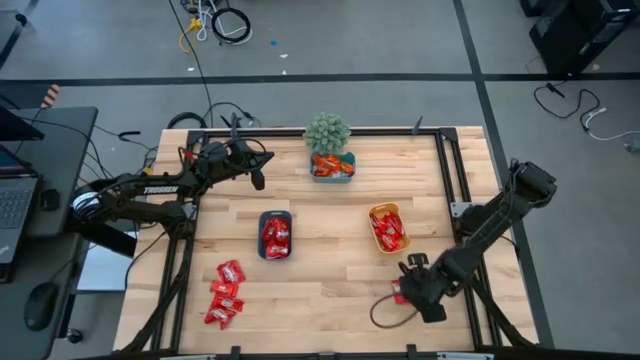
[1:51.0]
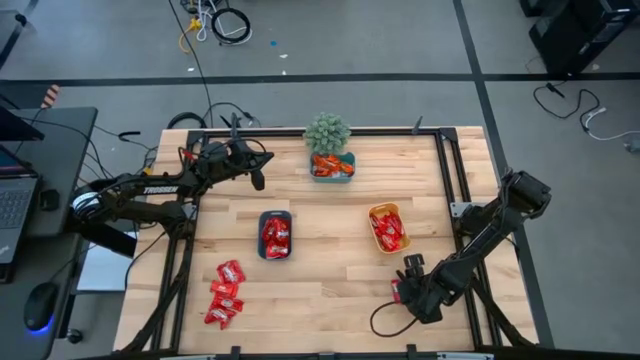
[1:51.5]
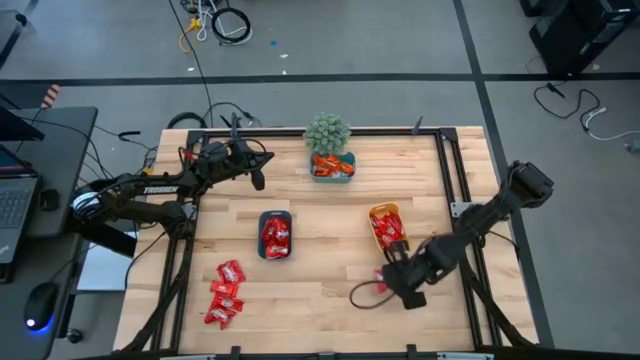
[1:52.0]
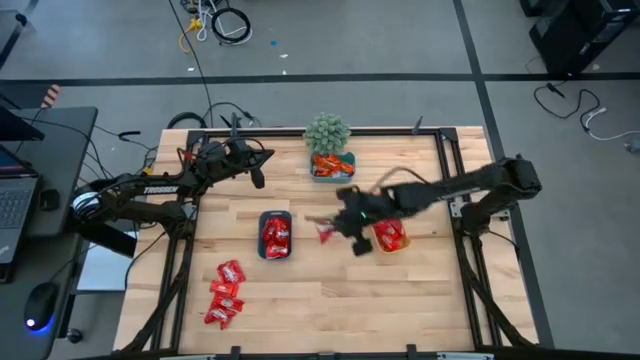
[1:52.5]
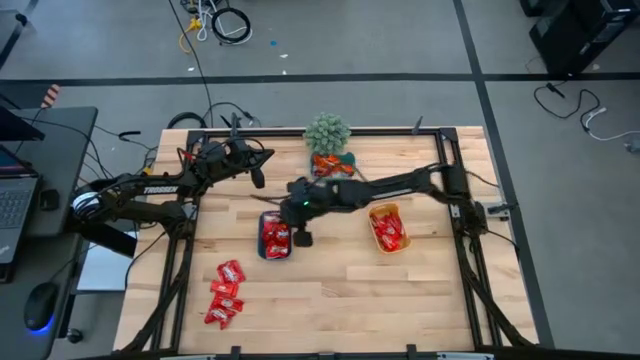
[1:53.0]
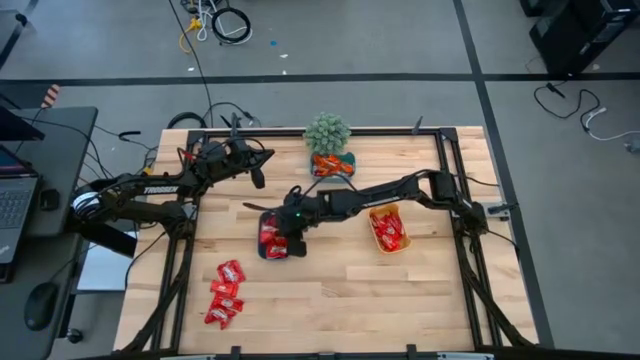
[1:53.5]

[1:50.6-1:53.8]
Task: Sort candy
Put the red candy into the blue bin

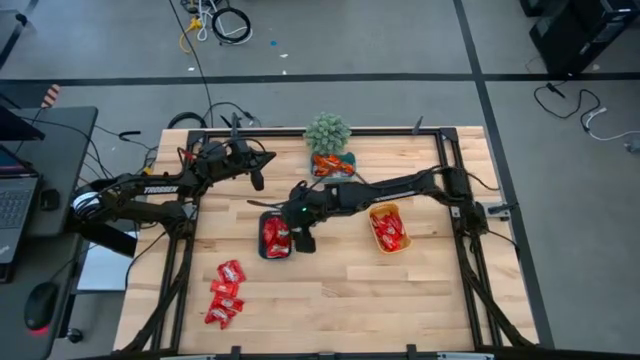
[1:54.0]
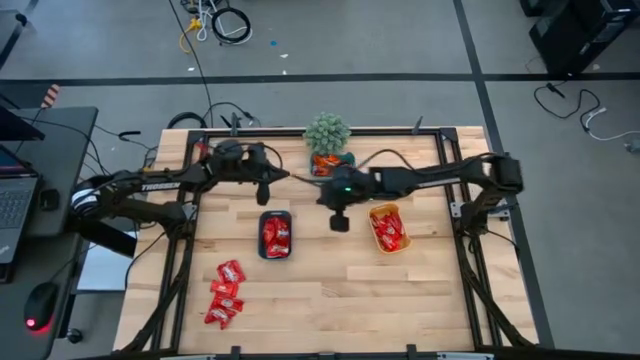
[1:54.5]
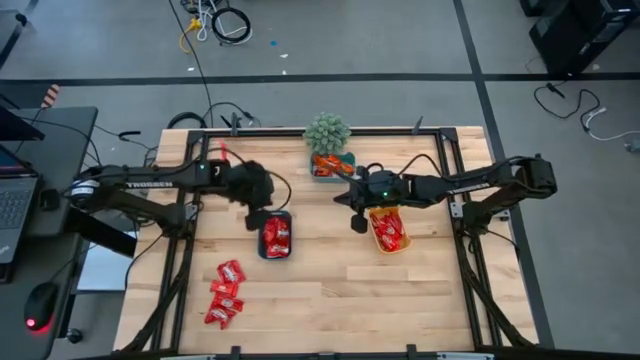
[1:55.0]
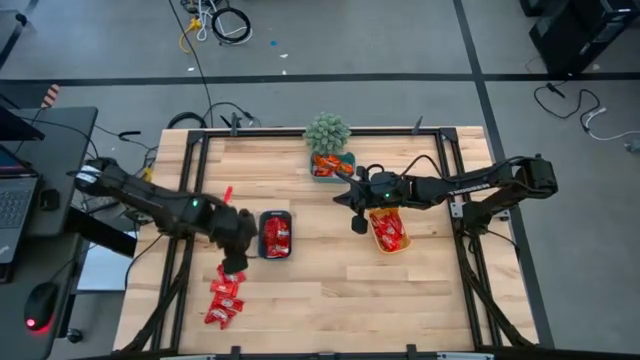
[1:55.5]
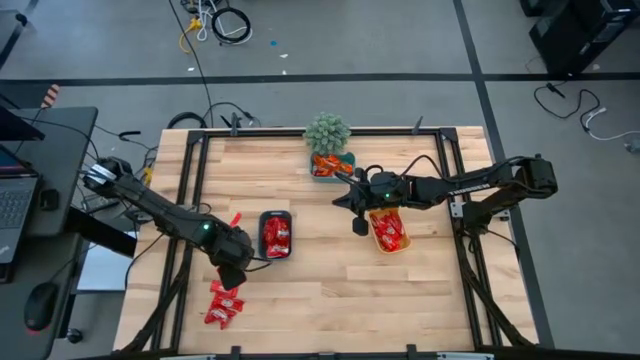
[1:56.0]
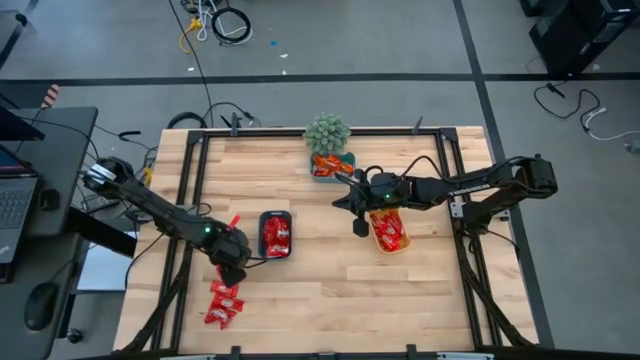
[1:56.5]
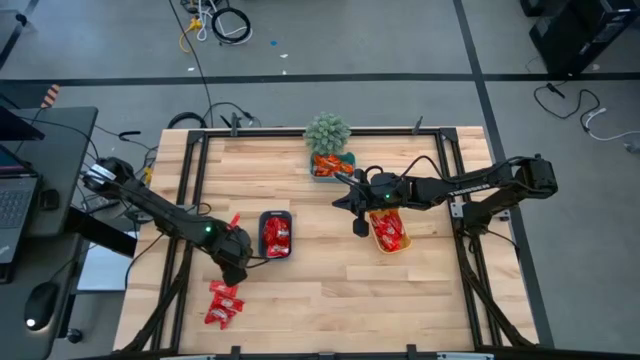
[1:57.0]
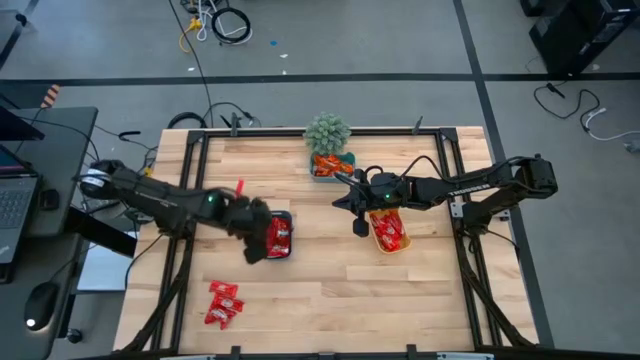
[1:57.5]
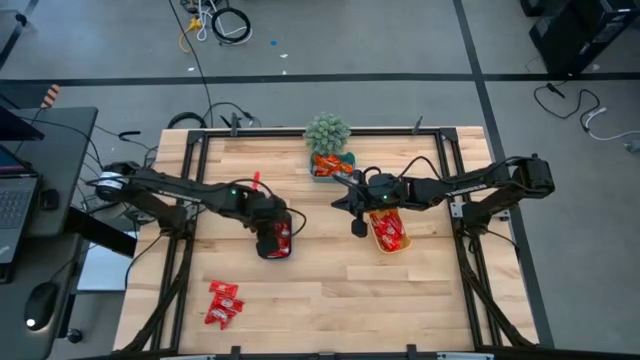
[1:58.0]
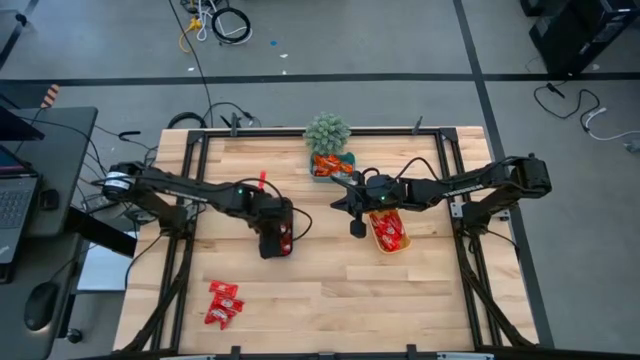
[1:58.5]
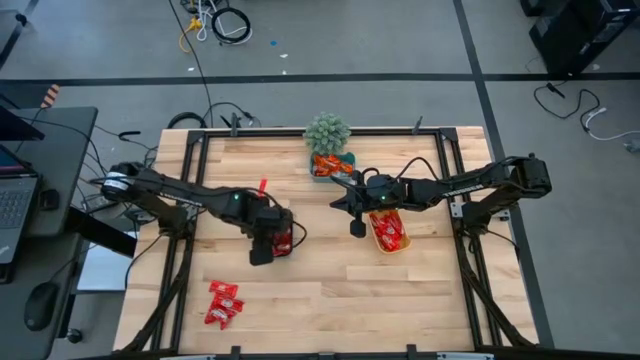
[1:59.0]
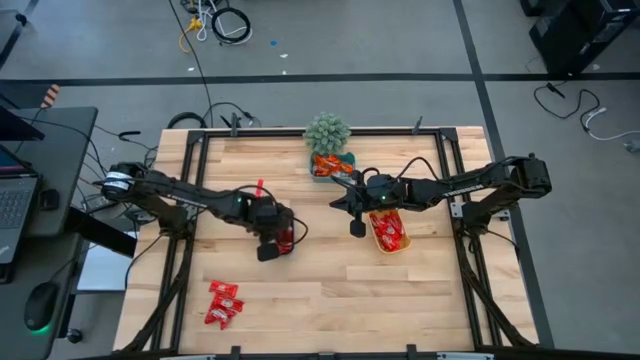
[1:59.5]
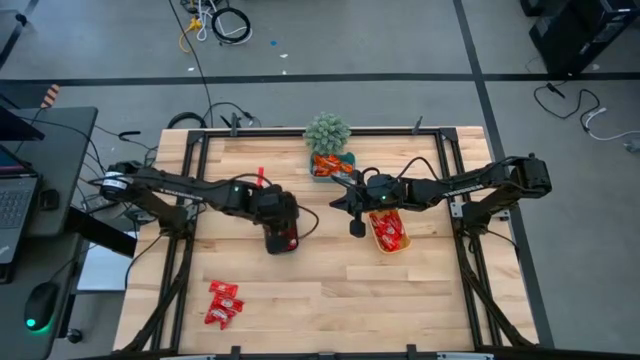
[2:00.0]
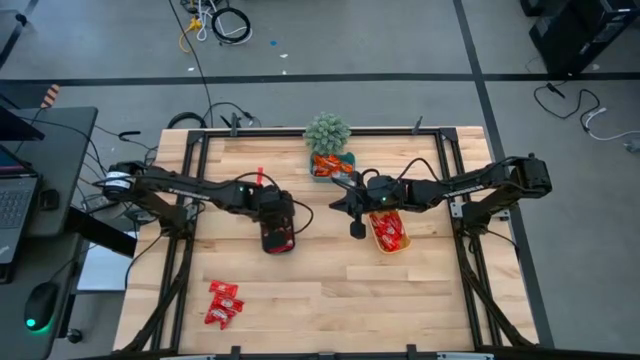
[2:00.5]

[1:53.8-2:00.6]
Put the red candy into the blue bin

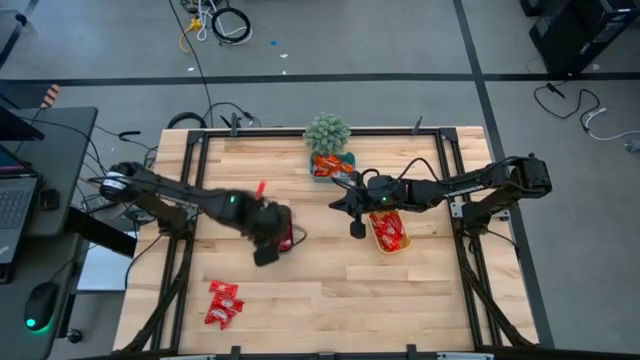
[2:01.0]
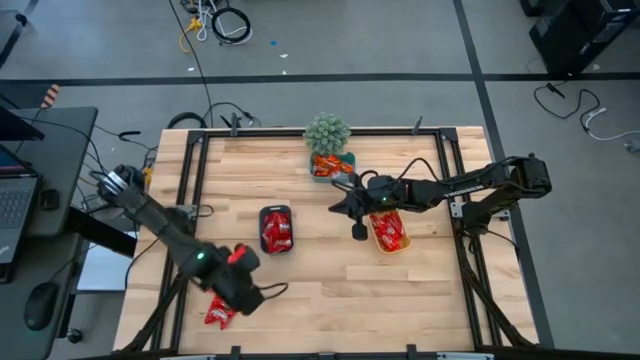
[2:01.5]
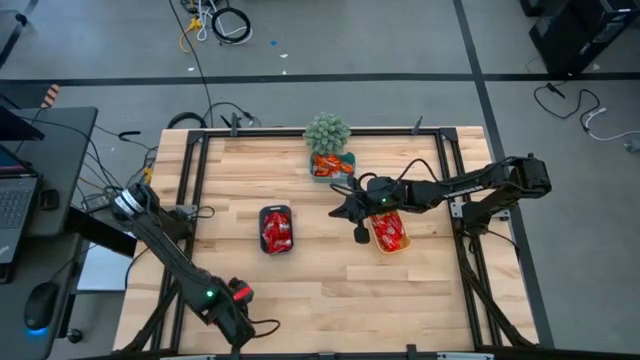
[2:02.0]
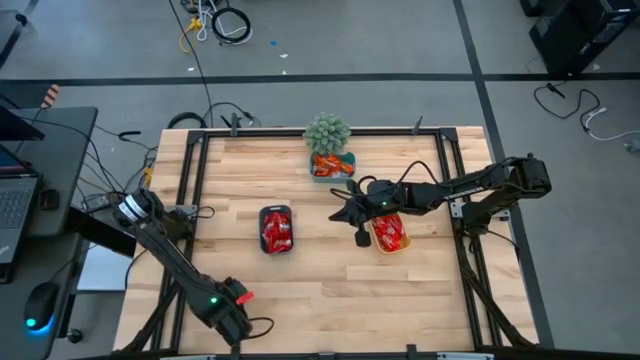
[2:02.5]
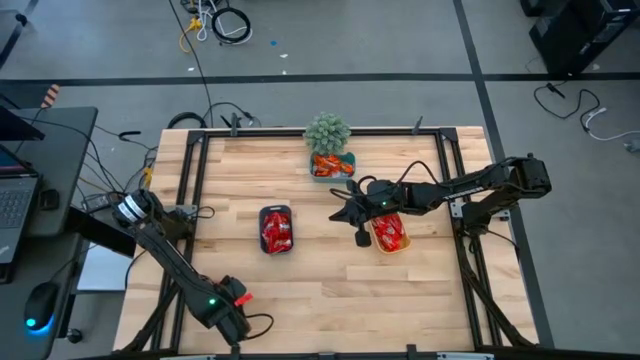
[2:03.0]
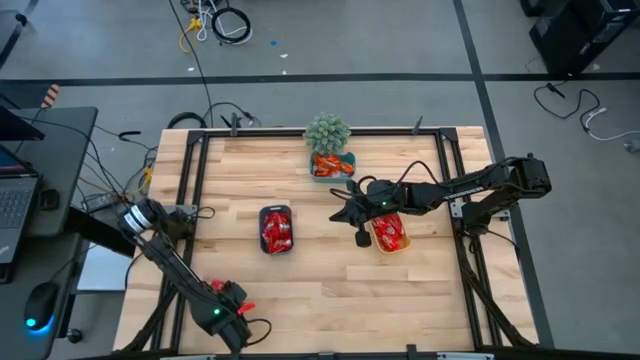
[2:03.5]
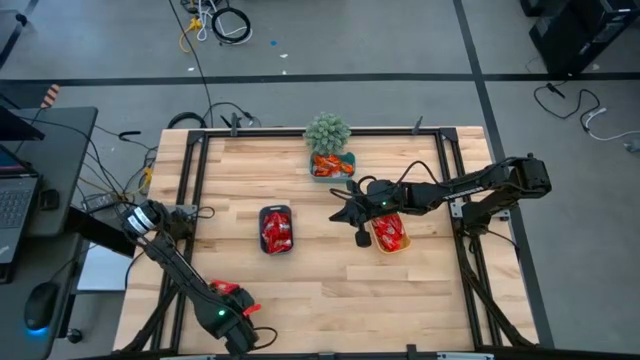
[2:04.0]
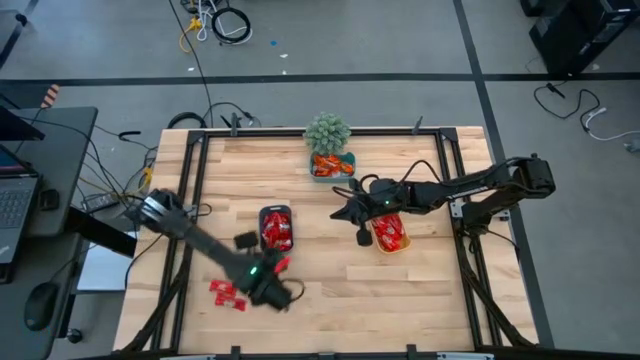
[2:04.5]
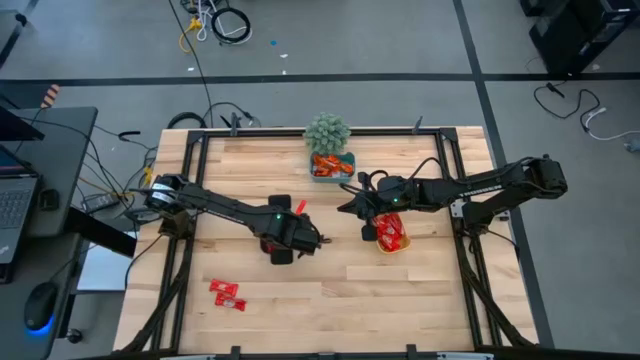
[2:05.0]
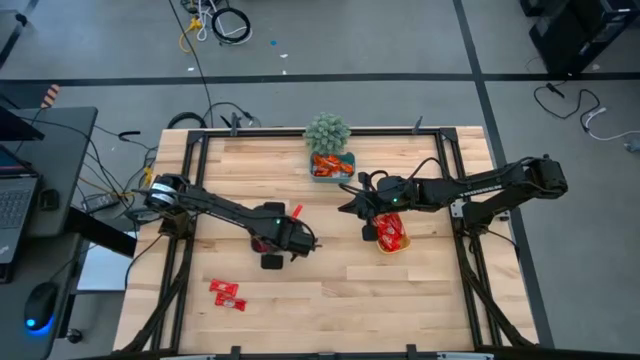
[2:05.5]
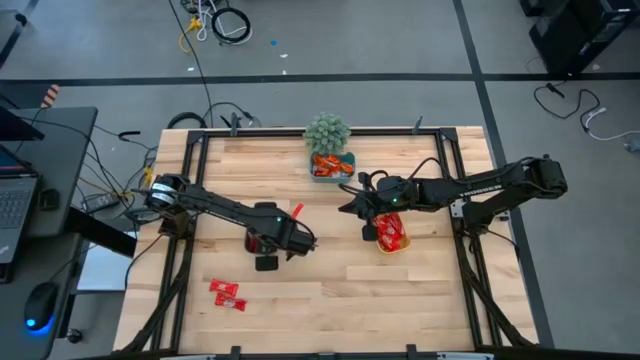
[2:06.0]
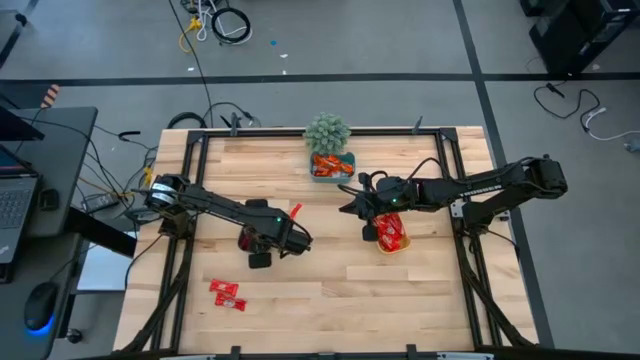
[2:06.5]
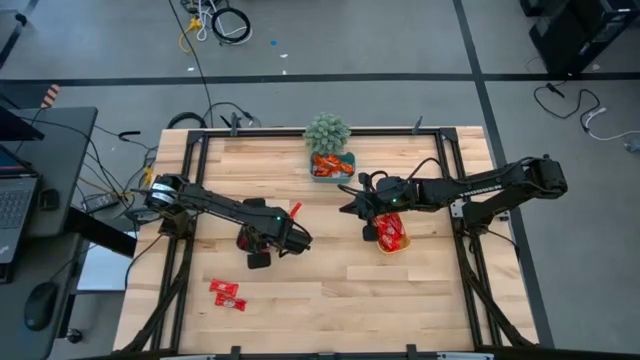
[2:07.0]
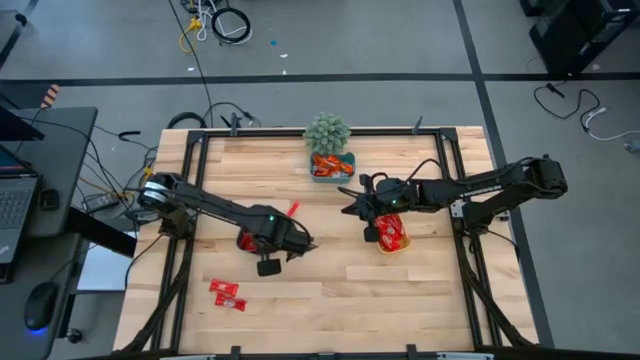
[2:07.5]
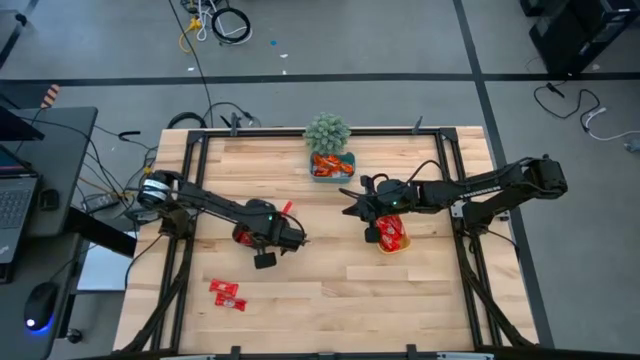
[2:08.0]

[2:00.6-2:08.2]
Put the red candy into the blue bin

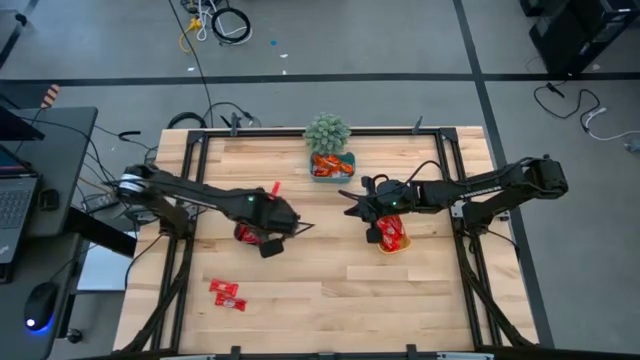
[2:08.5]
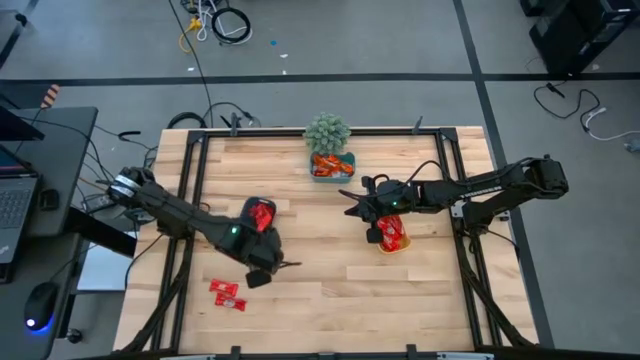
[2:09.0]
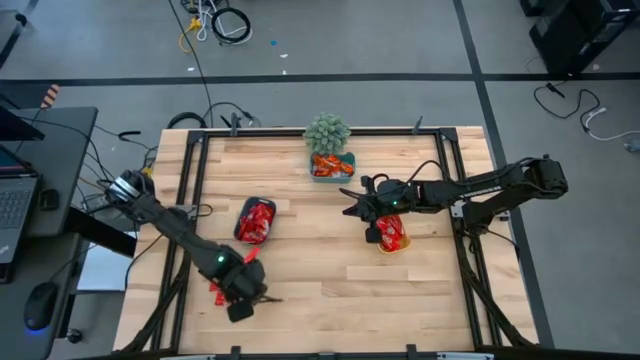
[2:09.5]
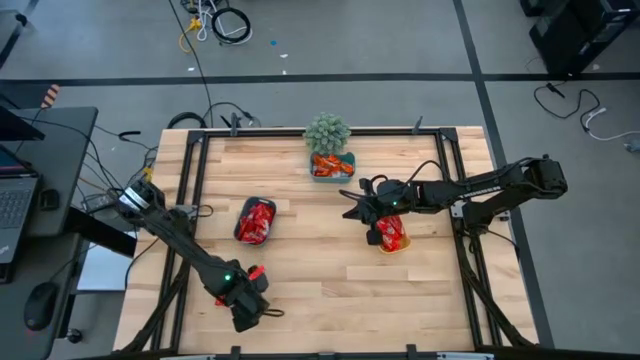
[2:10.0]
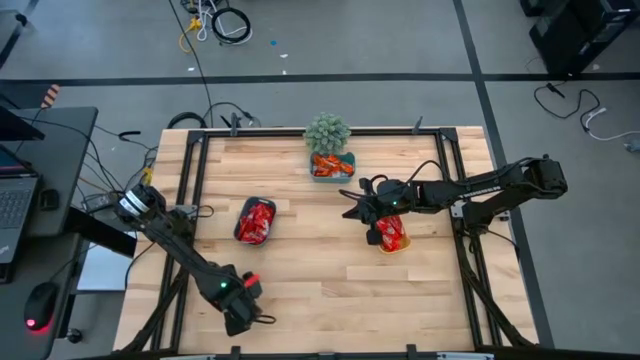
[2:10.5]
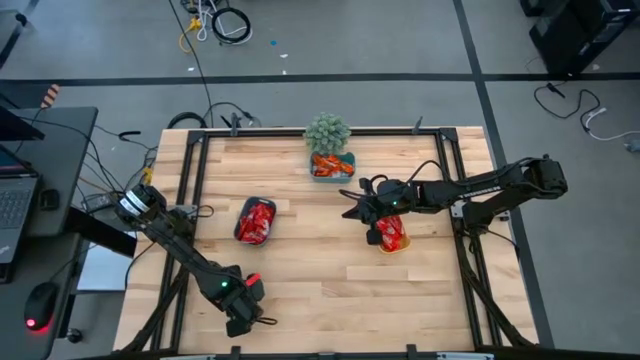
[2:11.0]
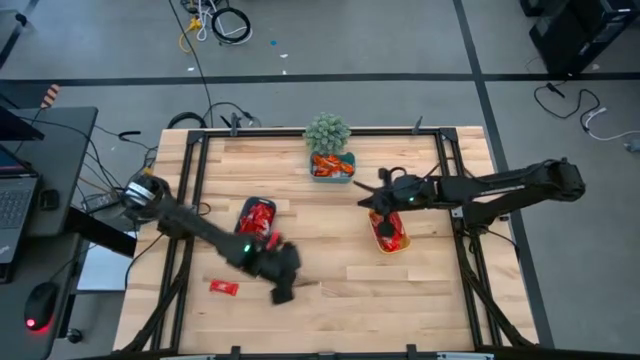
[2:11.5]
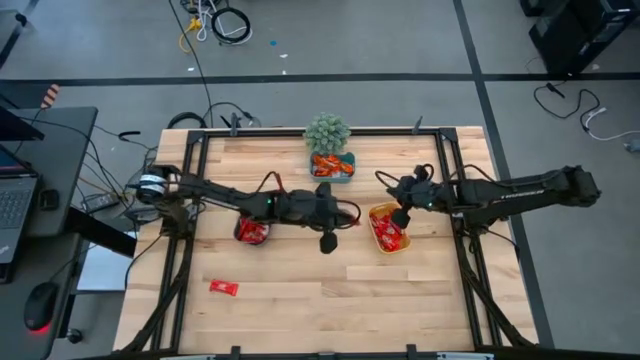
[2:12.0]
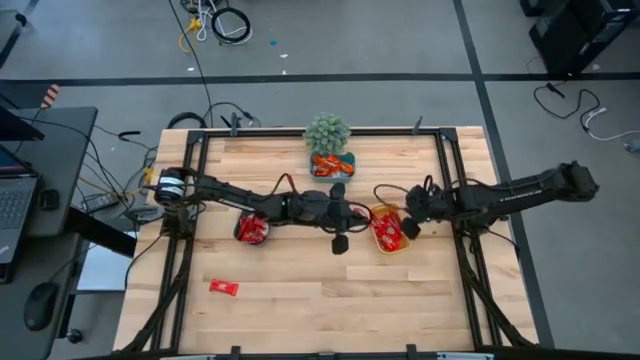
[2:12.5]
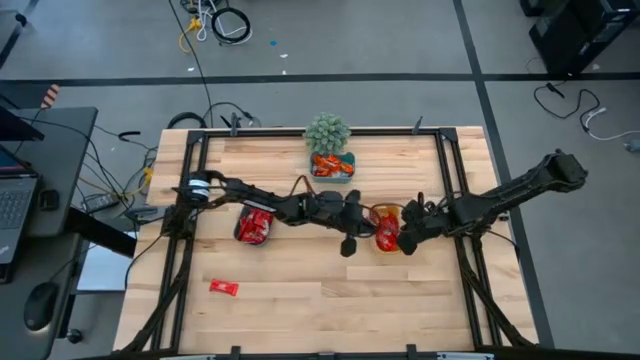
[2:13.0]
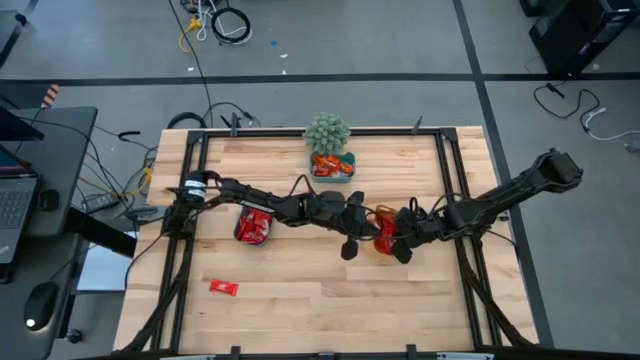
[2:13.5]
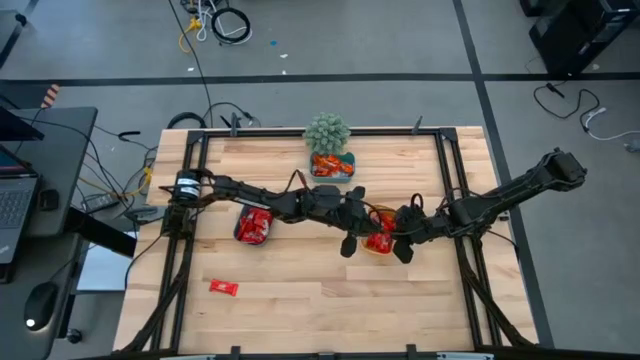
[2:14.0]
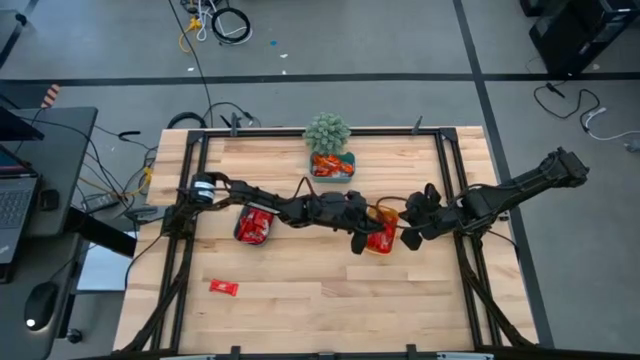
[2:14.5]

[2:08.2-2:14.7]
Put the red chocolate into the yellow bin
